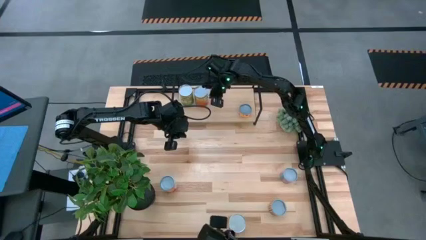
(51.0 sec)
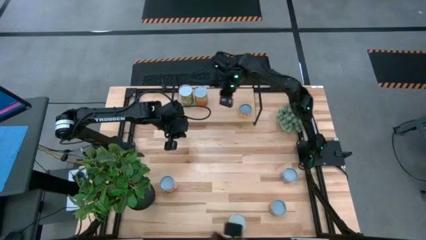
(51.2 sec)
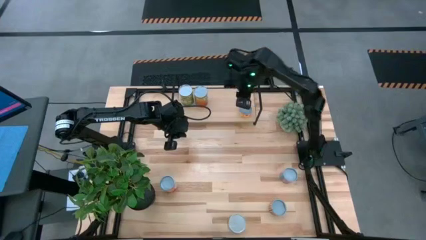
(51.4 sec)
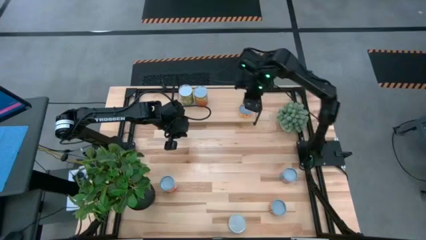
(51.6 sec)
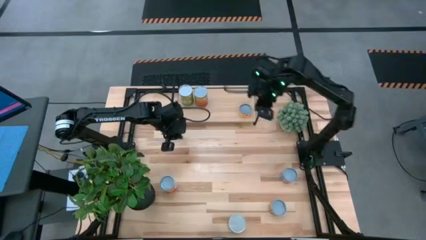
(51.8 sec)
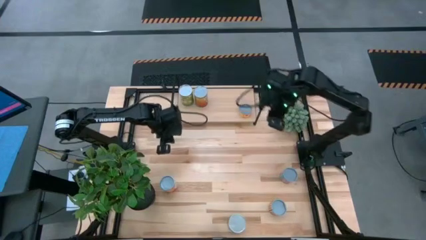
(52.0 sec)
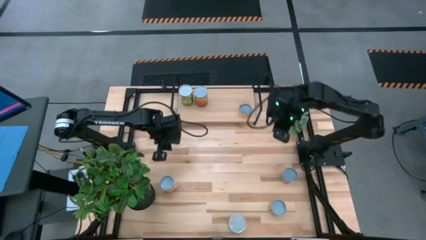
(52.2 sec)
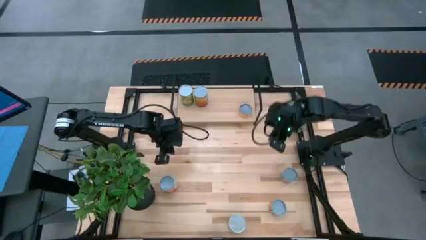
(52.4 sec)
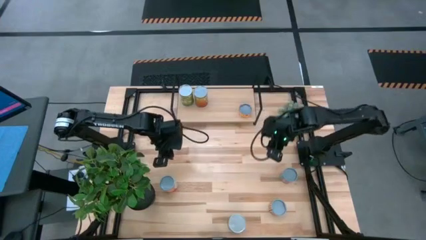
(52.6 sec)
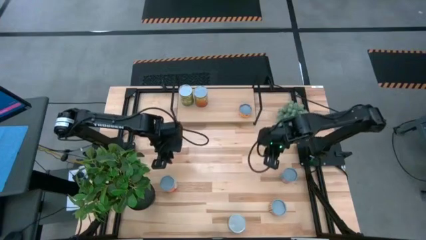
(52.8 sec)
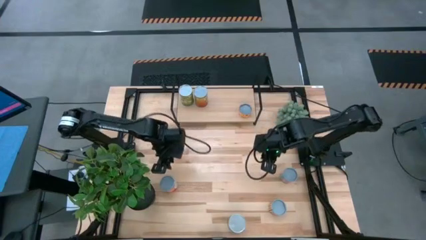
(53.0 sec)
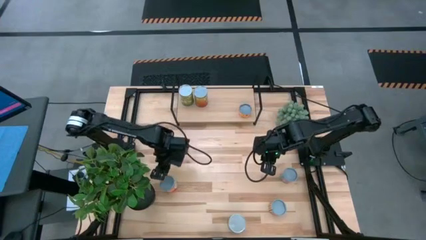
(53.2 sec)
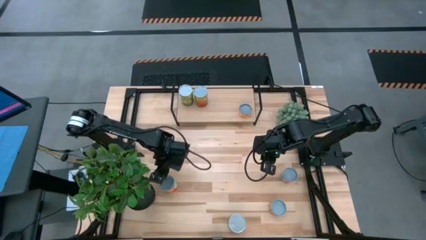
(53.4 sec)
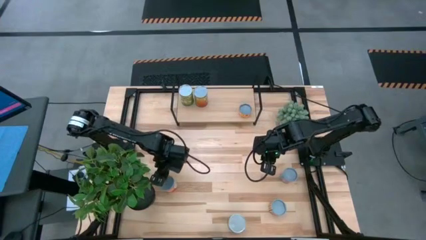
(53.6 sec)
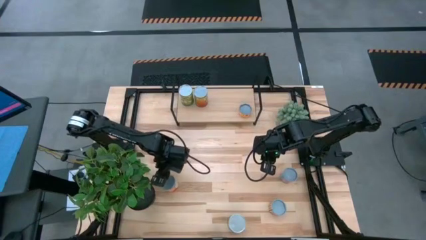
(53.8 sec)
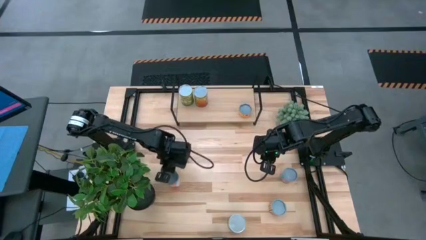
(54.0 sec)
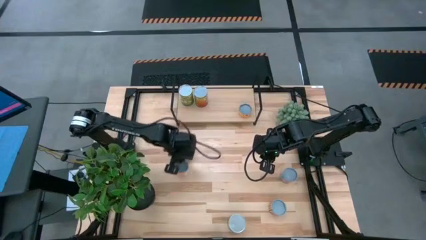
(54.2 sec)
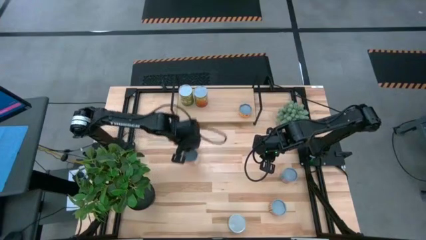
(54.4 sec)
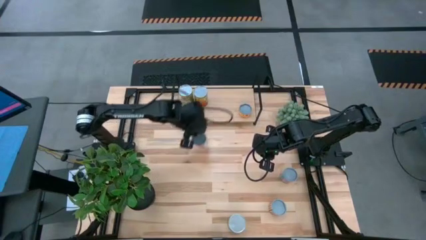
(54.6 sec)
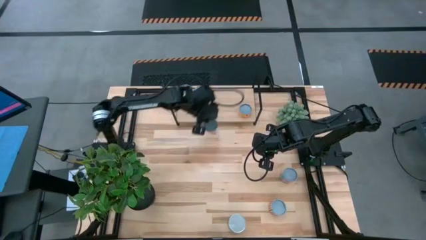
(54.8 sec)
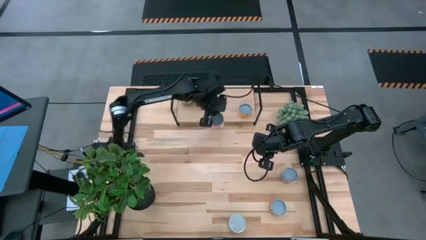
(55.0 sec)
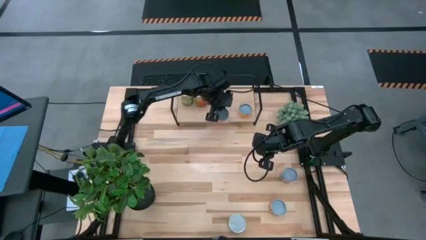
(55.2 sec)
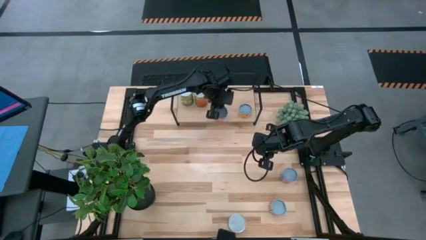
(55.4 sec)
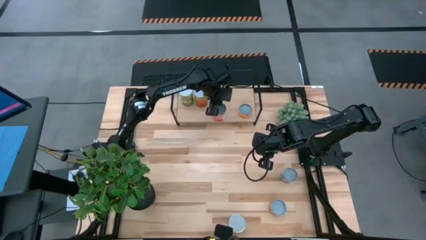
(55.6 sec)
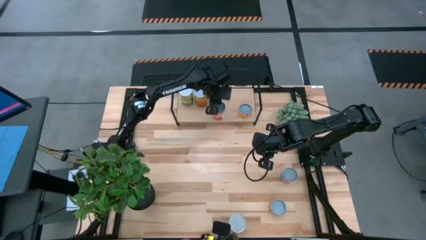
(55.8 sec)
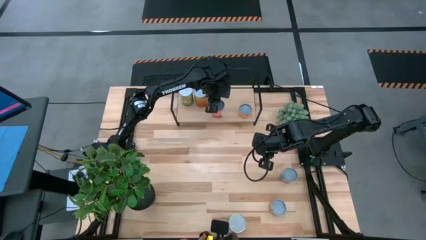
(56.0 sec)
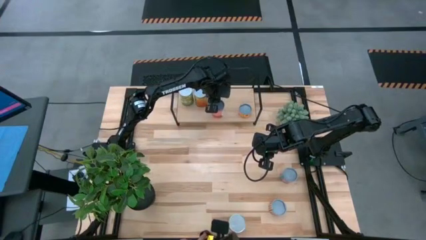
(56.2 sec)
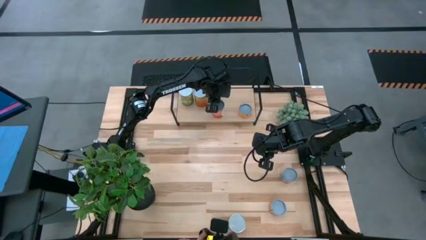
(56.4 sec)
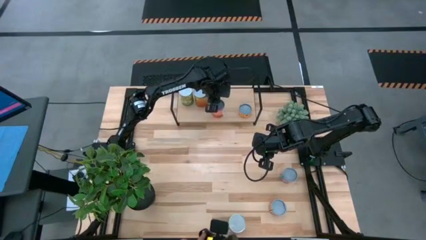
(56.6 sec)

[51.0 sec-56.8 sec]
Task: Pick and place cans onto a shelf
Put the canned pineapple on the shelf

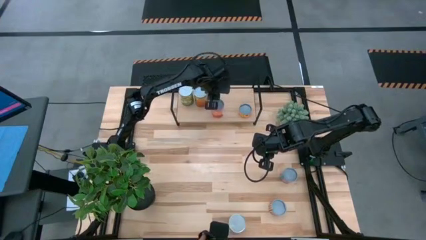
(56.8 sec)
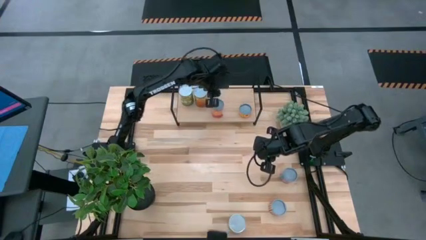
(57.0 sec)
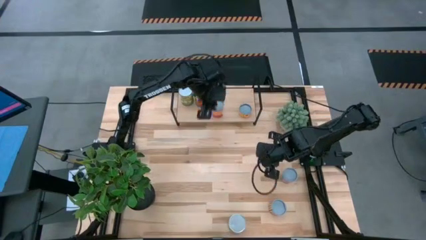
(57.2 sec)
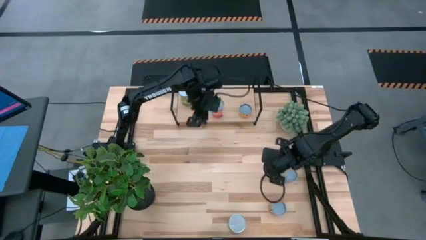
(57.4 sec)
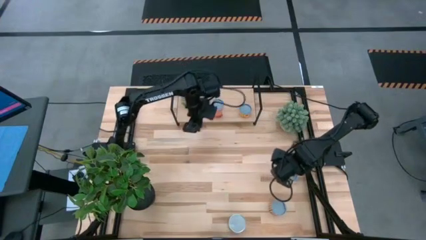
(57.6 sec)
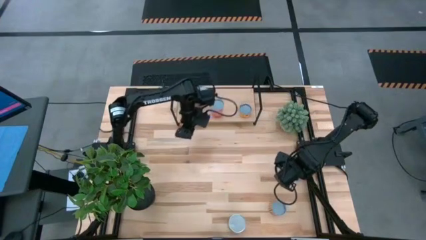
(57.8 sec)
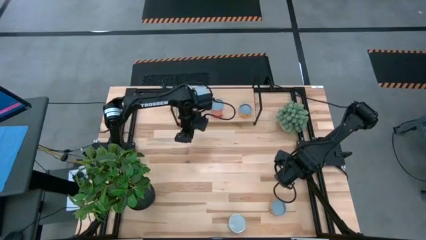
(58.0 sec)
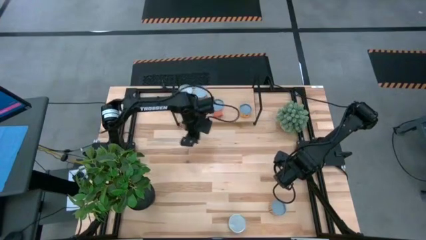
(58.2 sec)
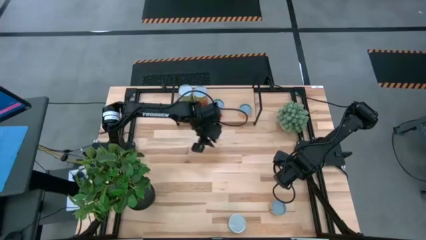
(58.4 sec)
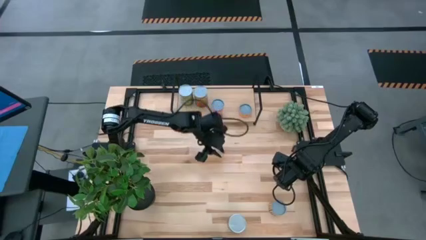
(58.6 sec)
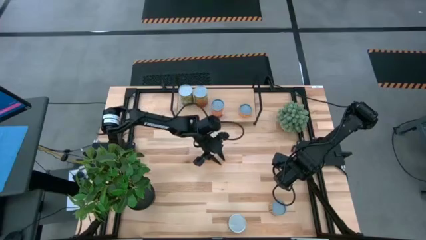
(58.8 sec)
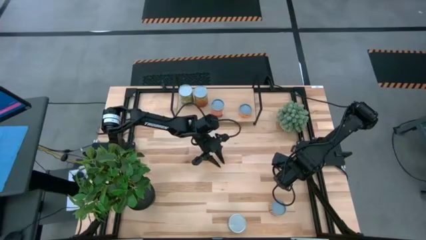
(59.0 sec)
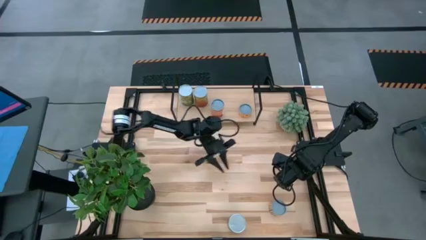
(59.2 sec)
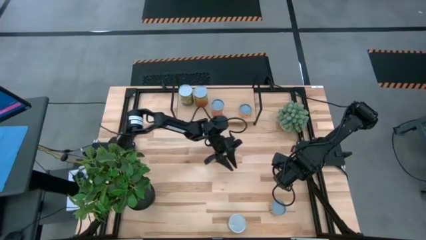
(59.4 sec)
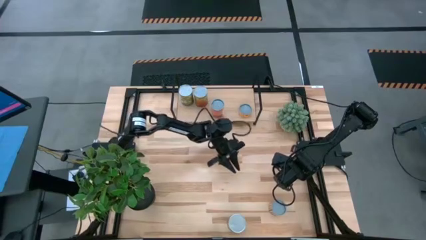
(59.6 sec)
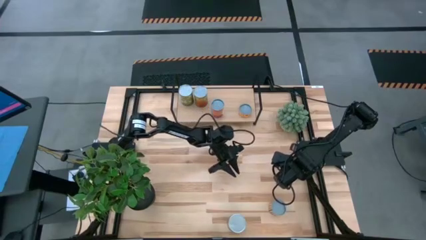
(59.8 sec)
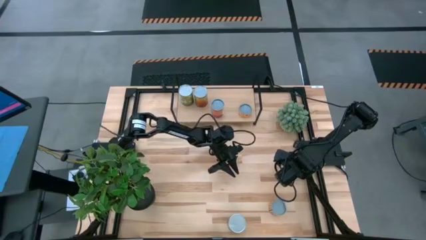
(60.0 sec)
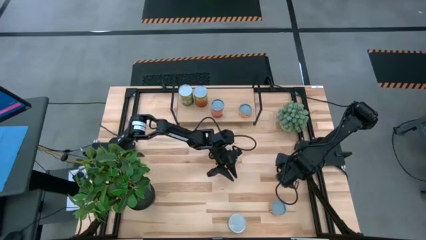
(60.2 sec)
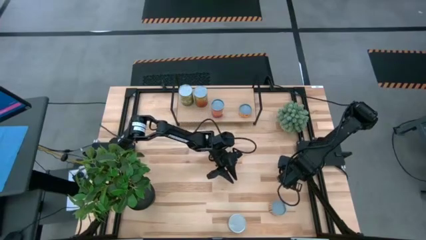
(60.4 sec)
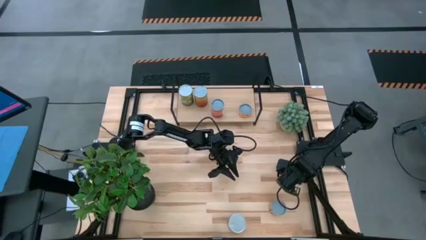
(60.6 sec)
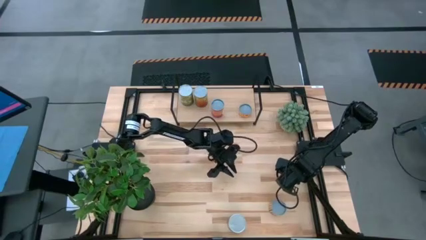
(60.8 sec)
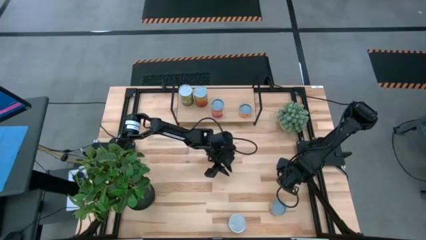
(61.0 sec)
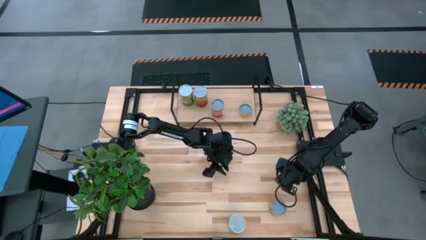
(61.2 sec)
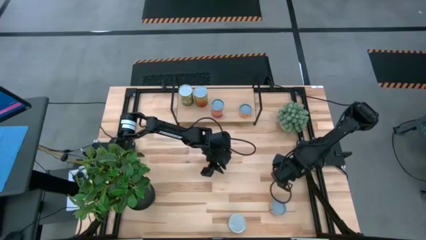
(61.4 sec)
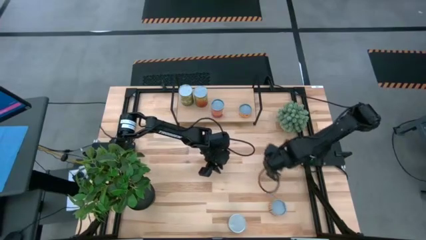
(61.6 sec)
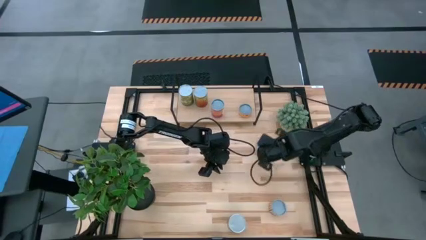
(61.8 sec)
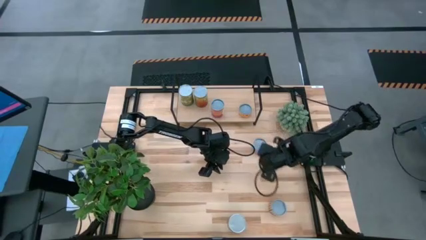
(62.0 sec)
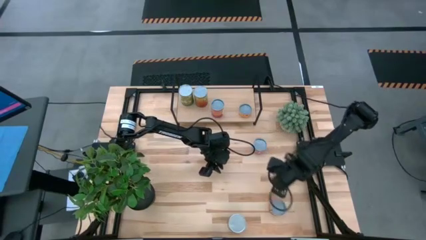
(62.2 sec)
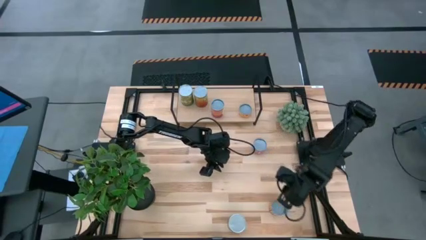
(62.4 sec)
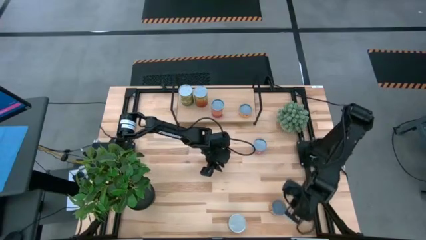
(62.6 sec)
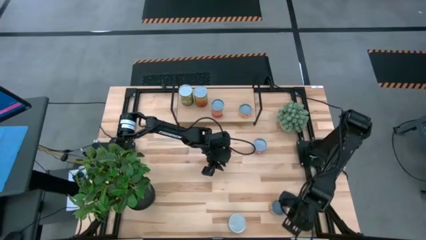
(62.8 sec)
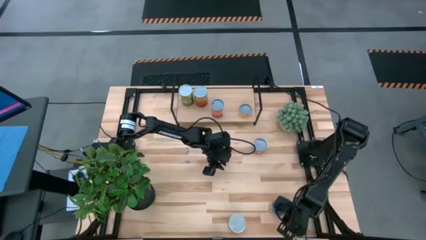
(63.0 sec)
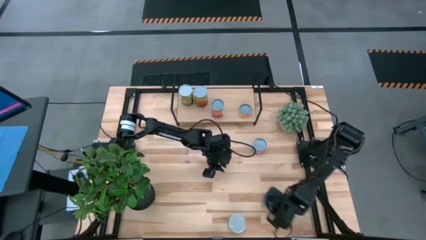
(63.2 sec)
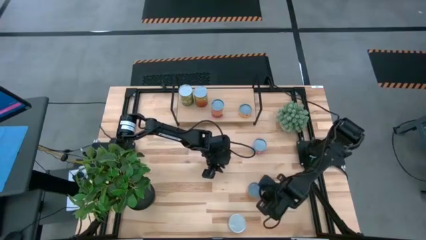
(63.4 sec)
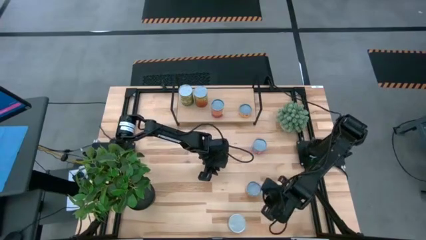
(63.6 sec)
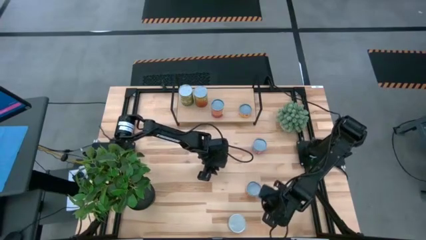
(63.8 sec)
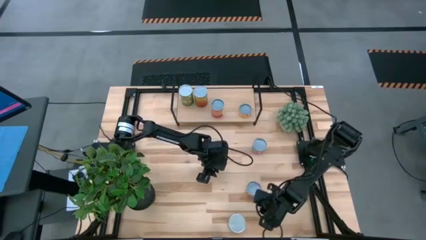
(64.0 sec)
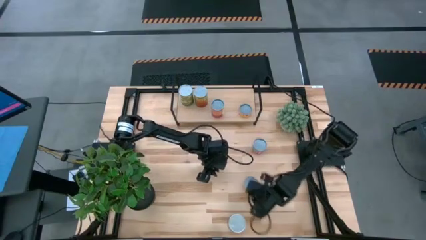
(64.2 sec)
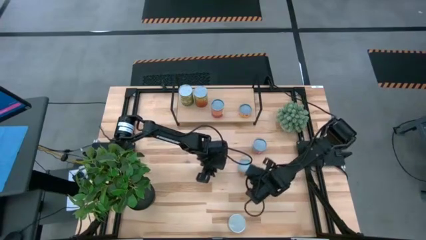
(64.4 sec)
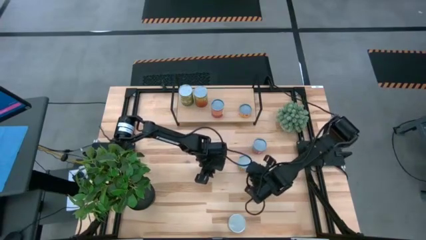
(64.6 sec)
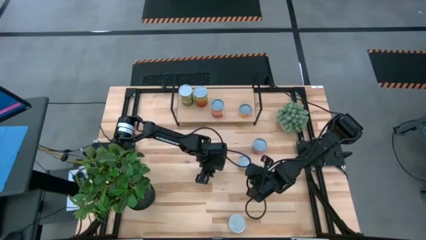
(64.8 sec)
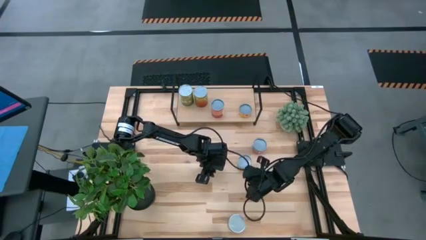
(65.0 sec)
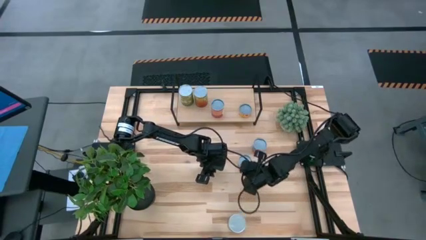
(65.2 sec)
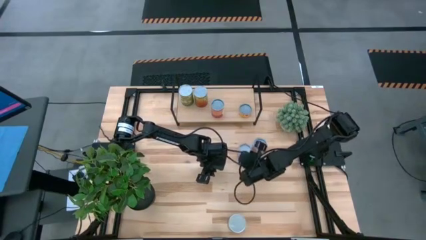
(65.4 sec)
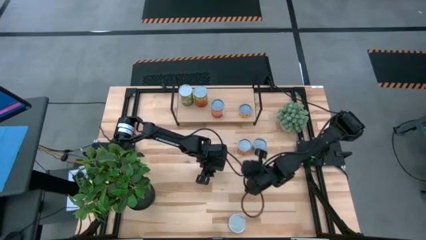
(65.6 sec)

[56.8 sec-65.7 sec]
Move the cans to the middle right of the table
